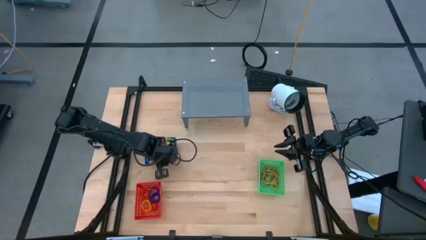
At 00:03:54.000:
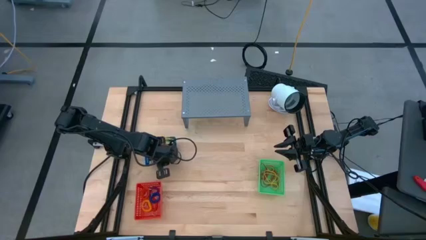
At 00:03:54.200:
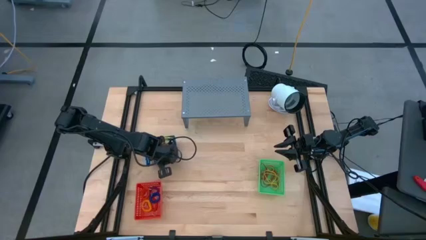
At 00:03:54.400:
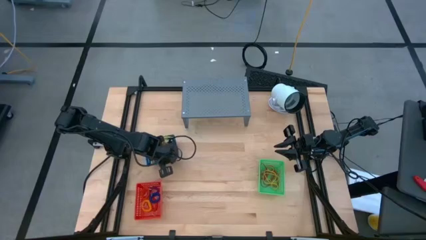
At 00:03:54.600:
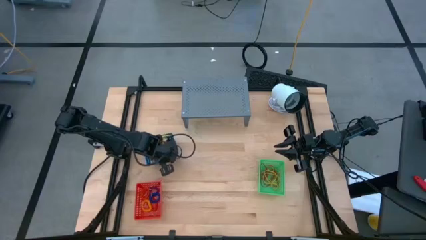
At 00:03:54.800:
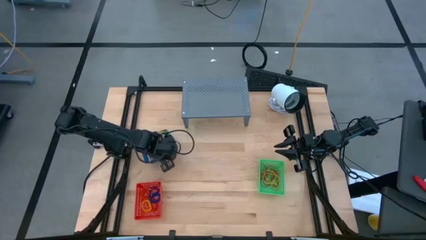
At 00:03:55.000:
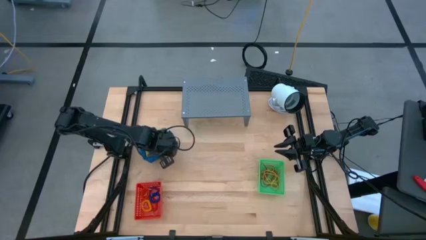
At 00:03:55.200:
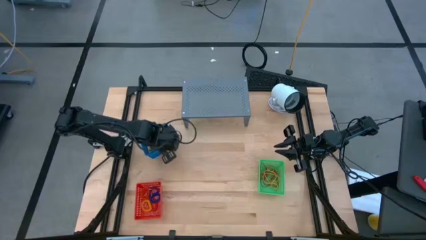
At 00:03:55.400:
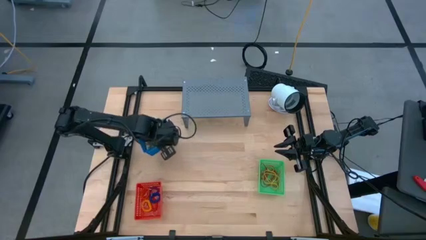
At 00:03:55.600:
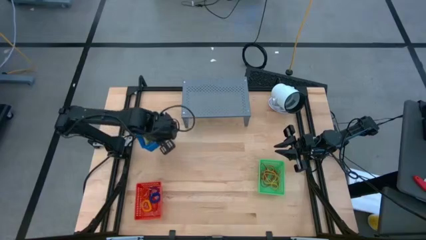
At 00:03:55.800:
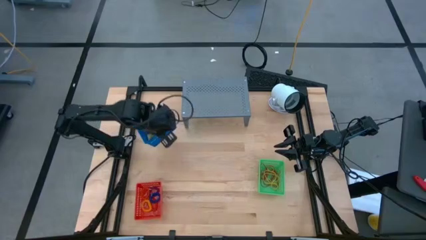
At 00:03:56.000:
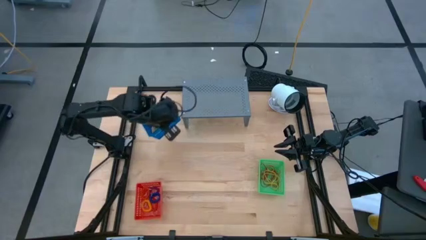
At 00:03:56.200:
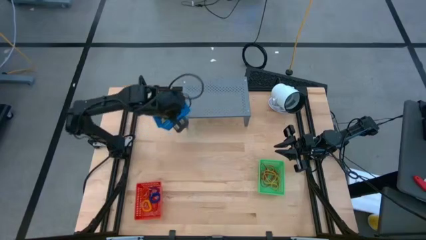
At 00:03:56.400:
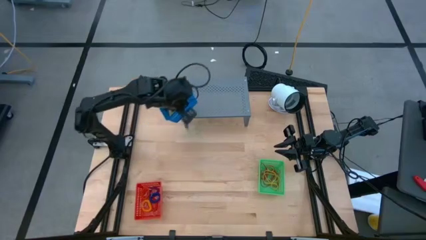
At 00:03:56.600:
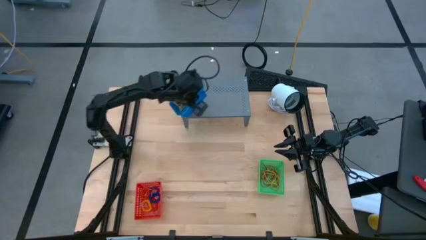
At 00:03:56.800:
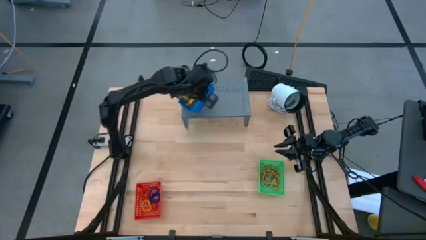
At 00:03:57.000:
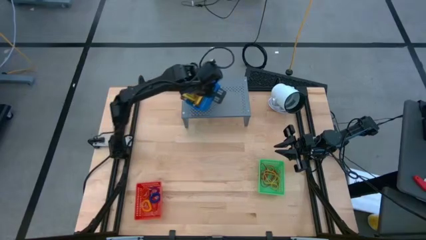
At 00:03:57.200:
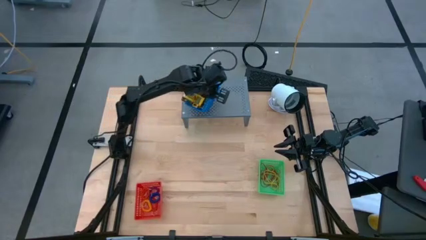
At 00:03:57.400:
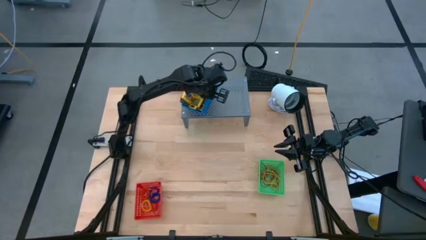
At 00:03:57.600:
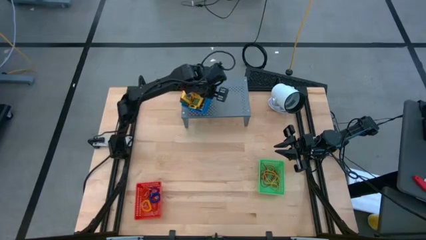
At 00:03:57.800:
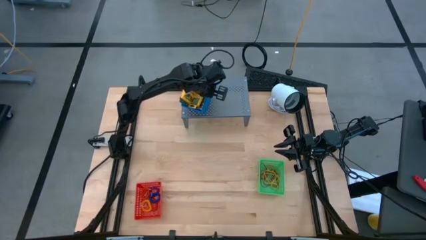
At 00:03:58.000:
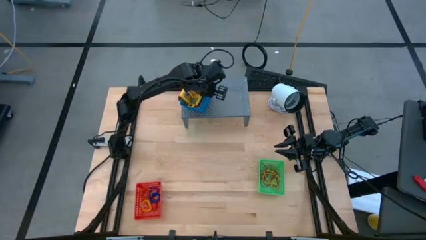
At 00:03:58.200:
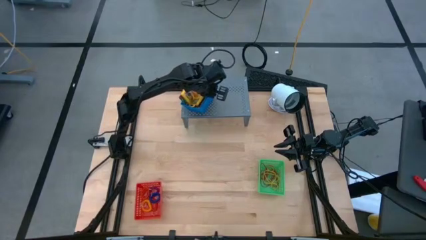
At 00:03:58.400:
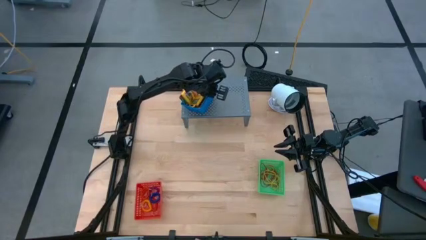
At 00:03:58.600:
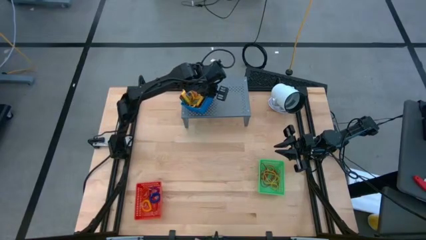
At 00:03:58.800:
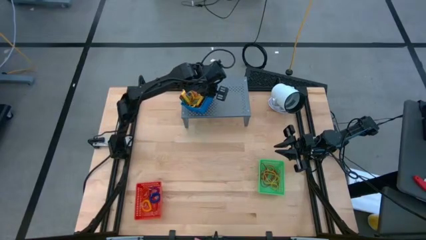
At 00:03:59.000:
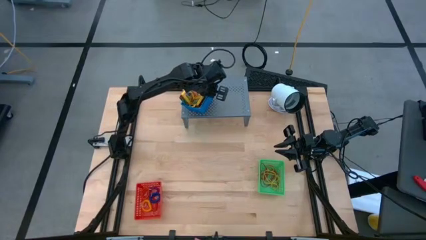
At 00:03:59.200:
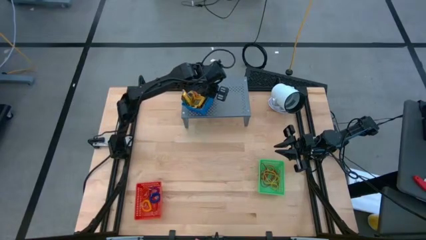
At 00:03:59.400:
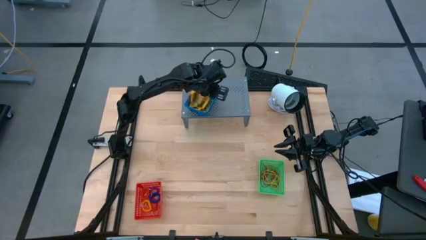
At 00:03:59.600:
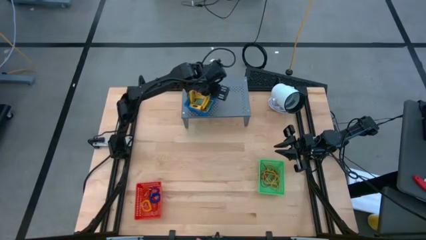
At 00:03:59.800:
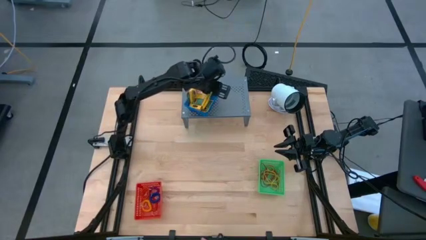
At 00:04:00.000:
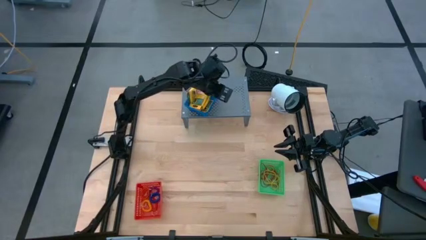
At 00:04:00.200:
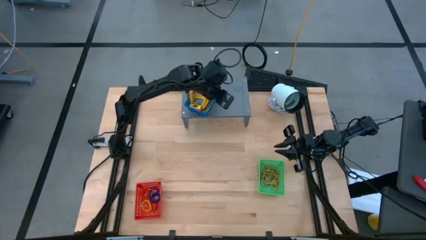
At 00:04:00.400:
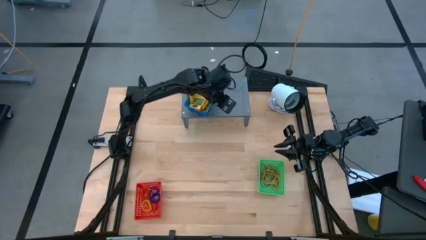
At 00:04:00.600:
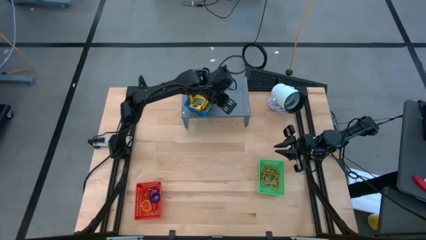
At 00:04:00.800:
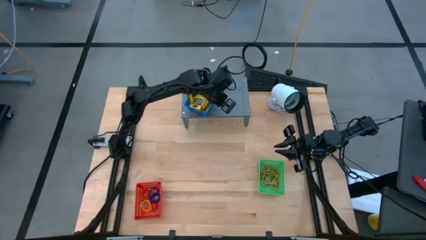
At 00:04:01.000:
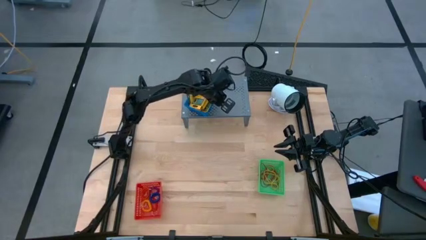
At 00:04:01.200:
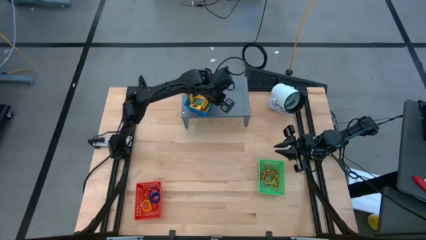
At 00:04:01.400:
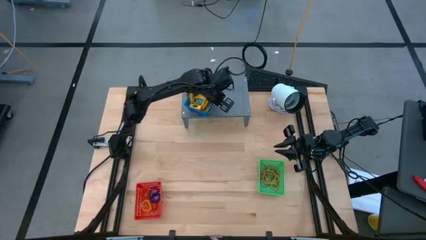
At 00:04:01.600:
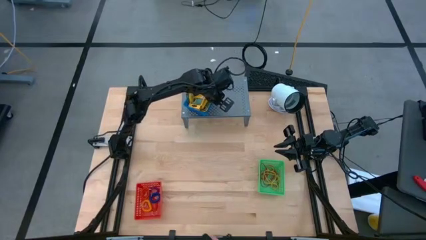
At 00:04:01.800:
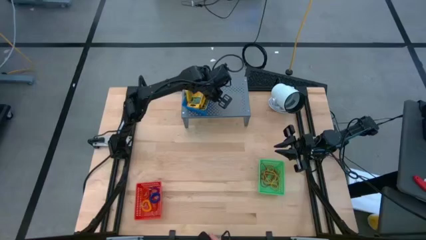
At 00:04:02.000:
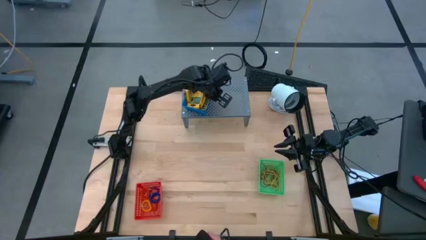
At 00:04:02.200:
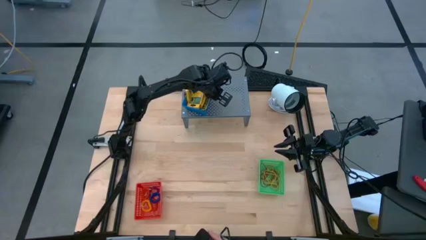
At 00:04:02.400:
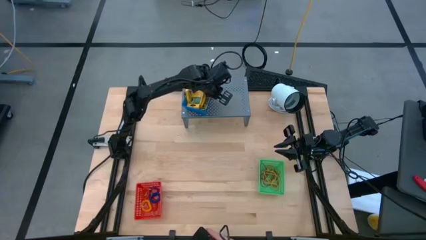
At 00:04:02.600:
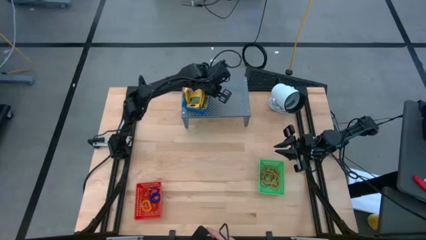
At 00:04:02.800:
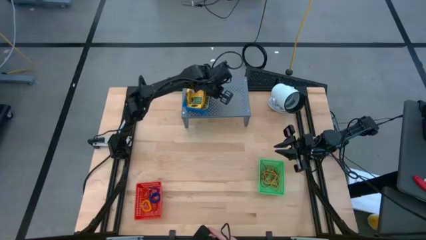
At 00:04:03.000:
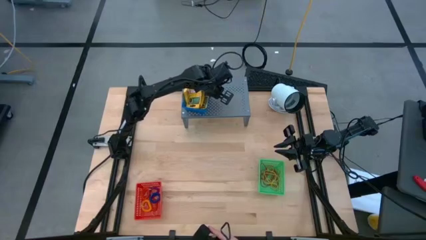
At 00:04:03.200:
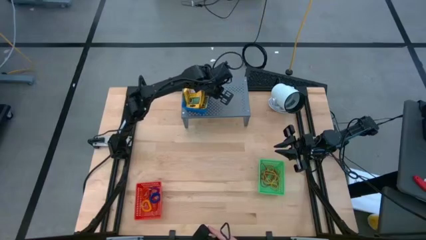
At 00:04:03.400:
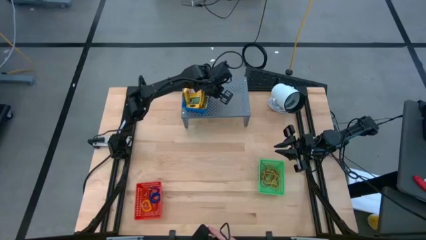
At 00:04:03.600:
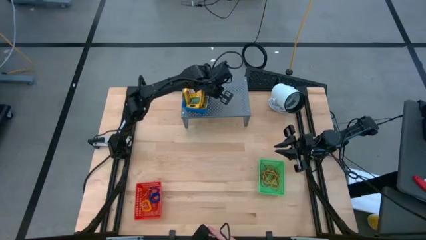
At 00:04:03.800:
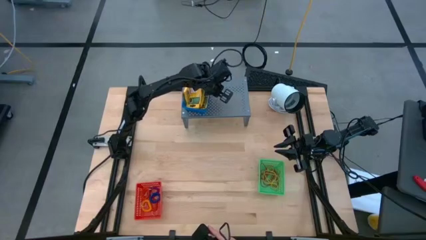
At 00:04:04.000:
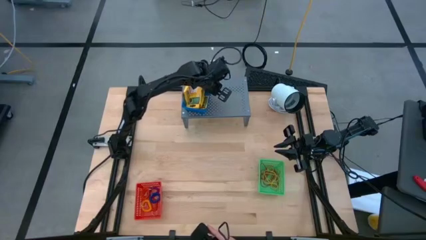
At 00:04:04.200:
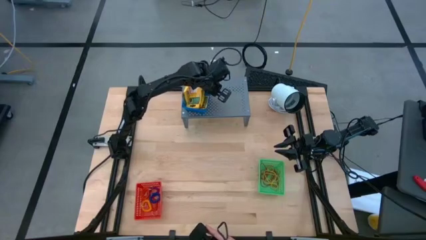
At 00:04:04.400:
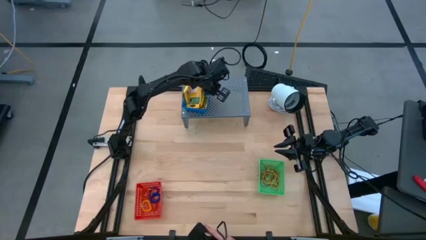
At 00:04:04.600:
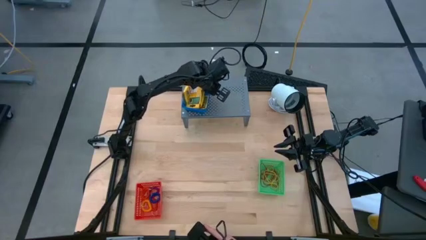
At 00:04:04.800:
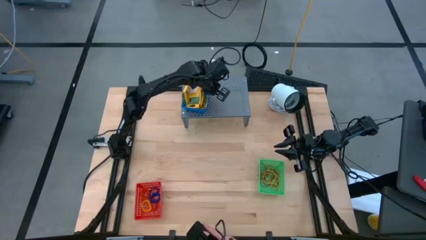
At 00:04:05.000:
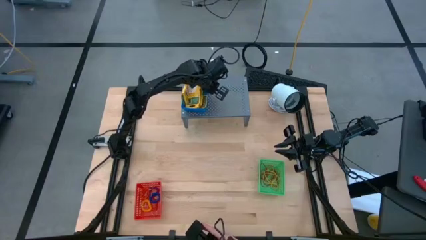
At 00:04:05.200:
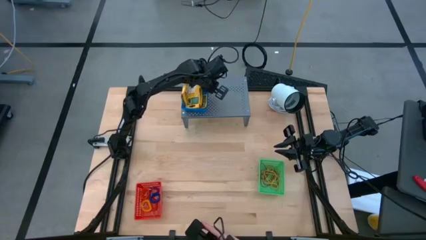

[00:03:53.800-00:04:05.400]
Task: Pick & Place Office Desk Supplies
Put the blue bin with crayon boxes on the shelf

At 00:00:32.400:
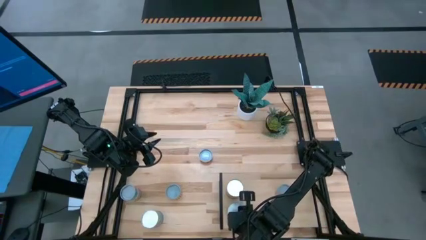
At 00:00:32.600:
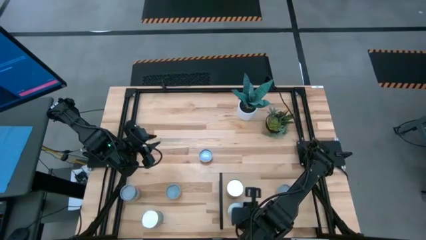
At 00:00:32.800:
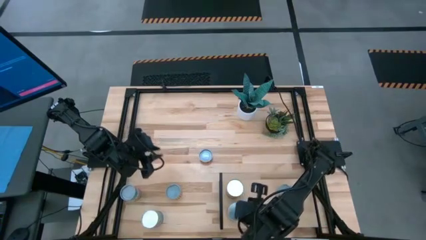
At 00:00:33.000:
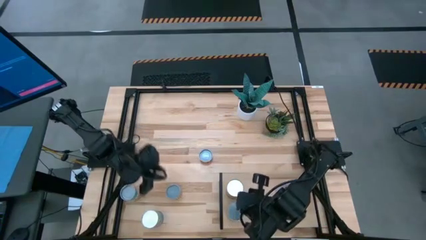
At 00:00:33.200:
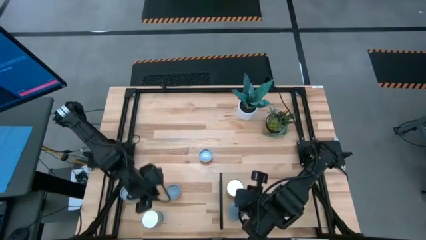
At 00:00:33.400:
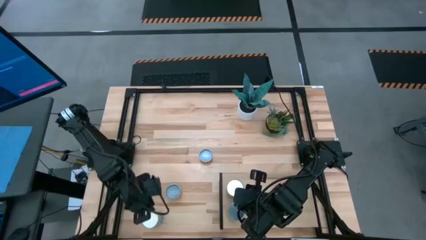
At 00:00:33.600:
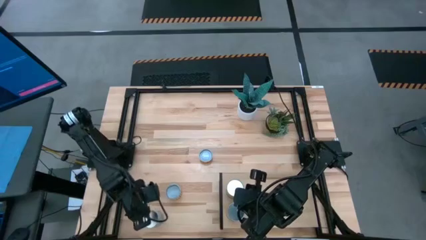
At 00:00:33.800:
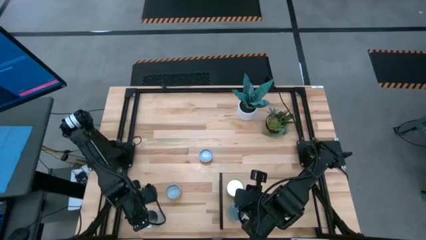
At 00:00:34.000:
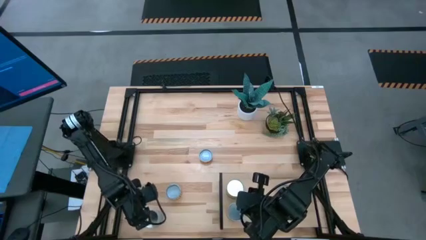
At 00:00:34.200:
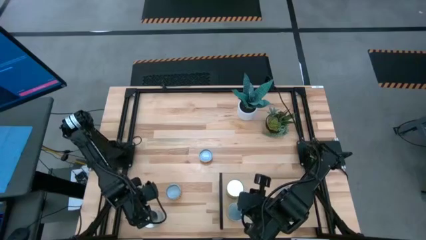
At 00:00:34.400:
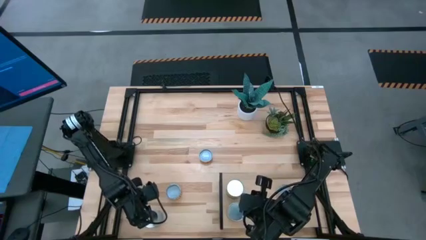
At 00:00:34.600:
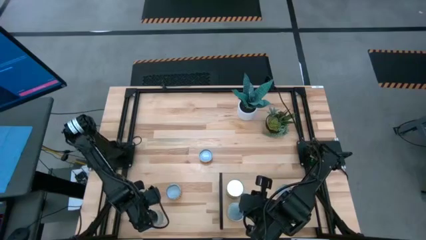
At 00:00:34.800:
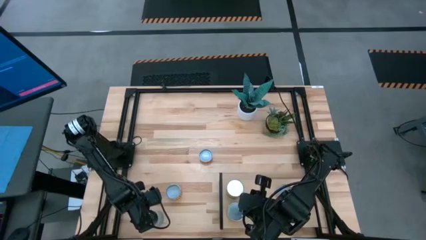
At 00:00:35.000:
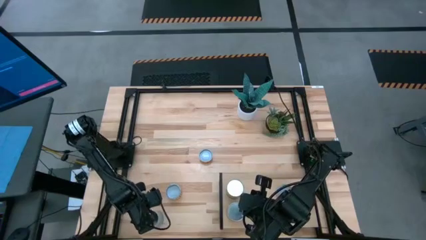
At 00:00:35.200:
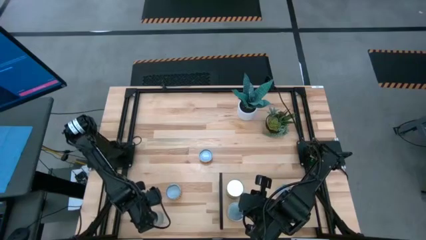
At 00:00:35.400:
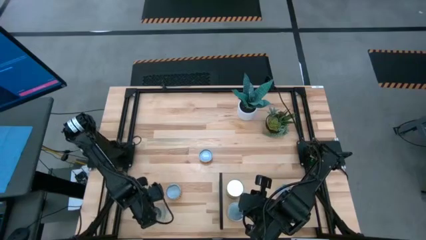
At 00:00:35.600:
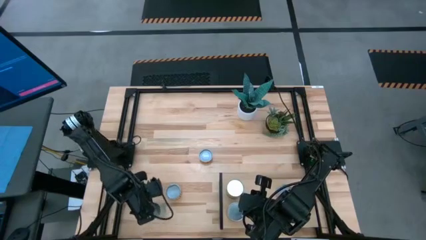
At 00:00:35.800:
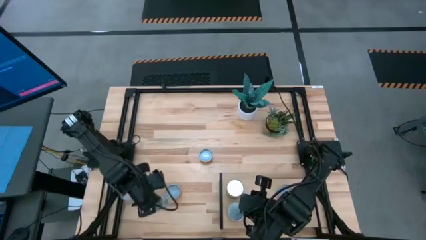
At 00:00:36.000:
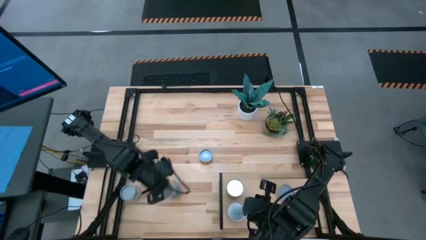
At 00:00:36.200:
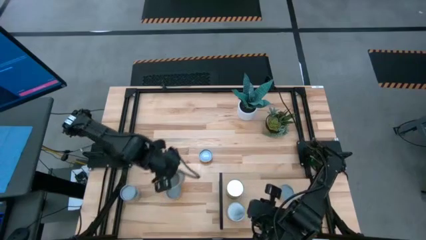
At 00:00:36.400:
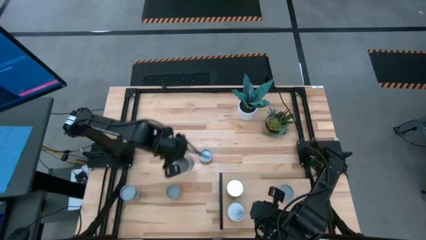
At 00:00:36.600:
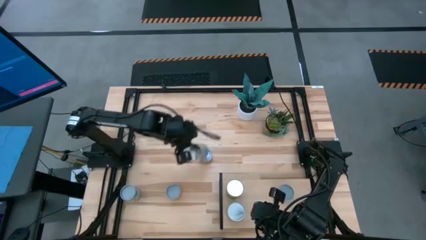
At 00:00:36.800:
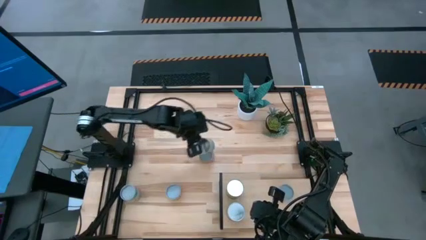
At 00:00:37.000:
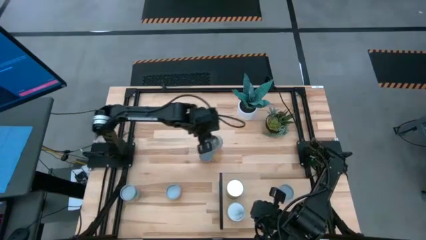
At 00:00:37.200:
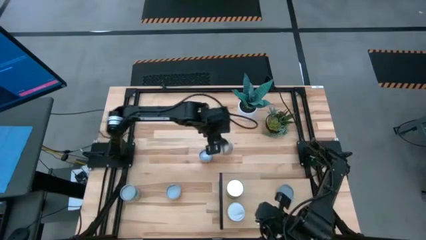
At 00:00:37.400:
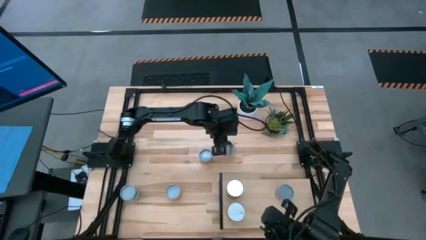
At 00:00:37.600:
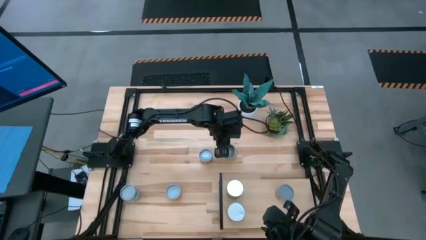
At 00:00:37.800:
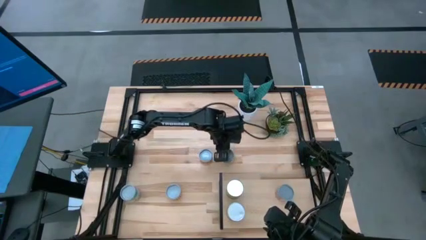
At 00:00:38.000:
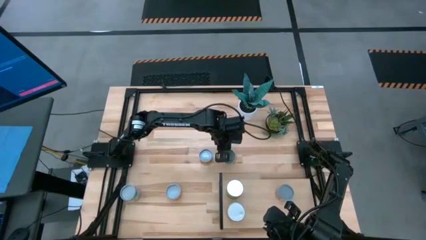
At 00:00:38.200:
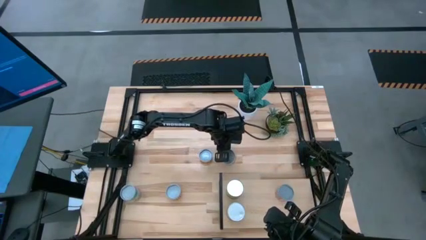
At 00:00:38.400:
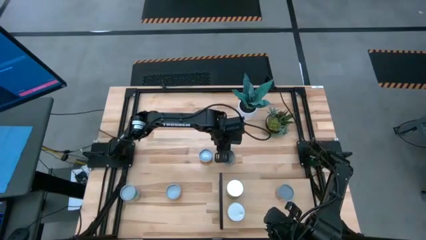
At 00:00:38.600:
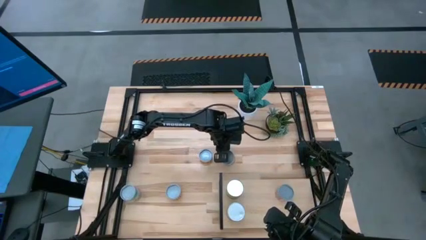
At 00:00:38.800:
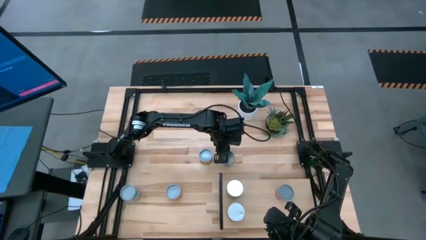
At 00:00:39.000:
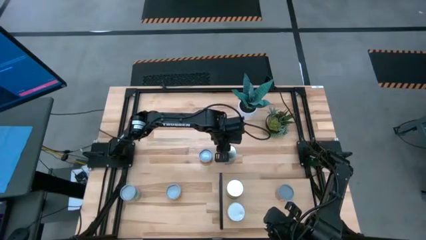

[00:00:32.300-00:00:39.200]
Task: Pick and place cans onto a shelf
Move the canned tomatoes from bottom left to the center of the table
